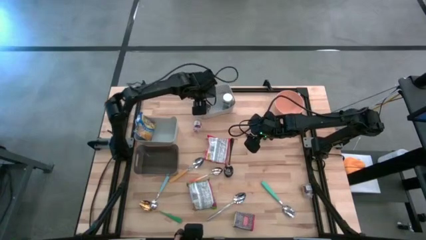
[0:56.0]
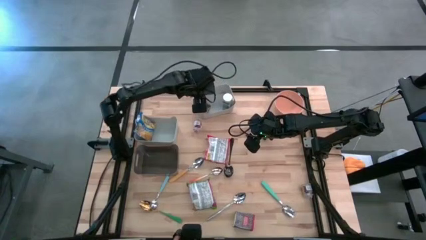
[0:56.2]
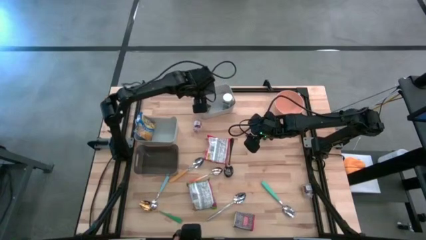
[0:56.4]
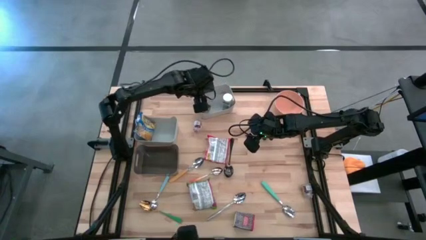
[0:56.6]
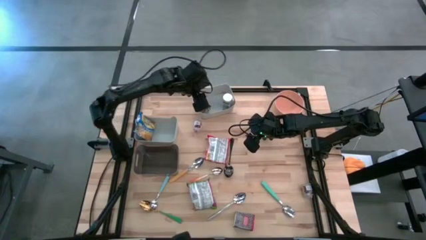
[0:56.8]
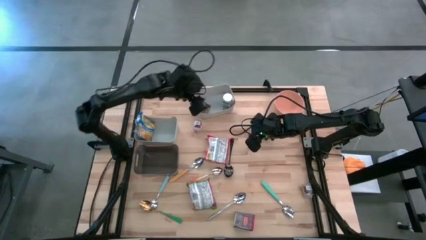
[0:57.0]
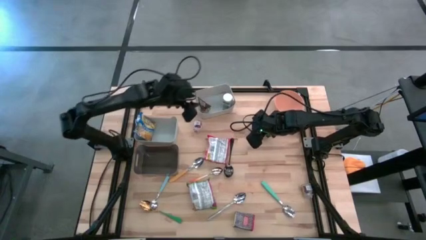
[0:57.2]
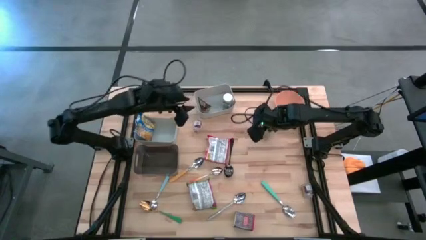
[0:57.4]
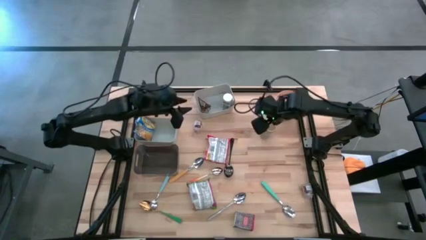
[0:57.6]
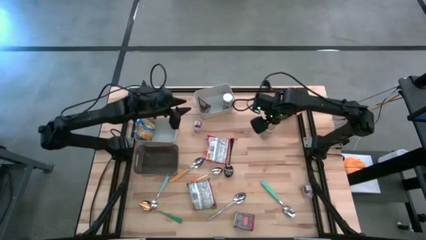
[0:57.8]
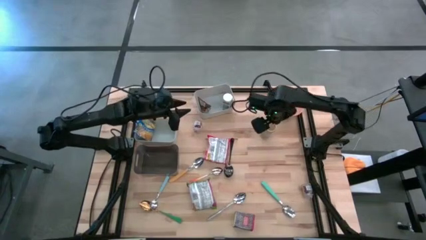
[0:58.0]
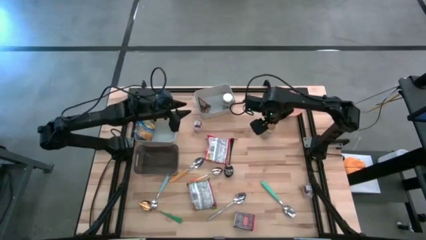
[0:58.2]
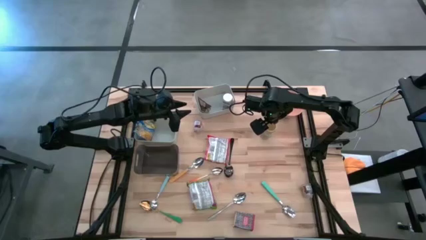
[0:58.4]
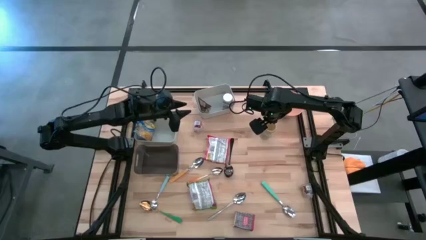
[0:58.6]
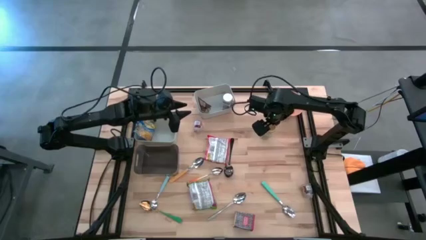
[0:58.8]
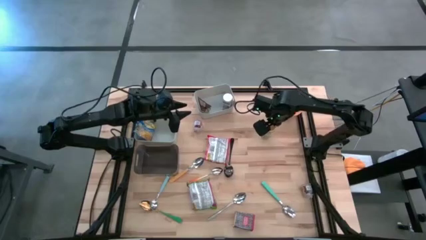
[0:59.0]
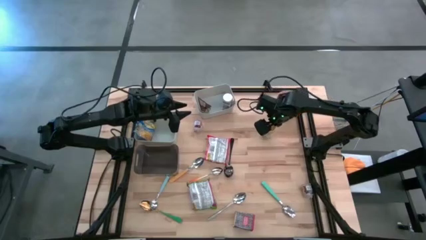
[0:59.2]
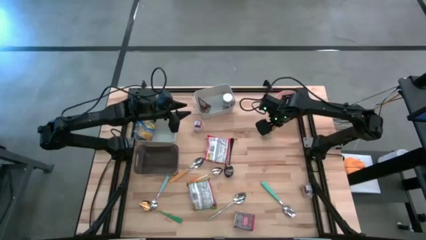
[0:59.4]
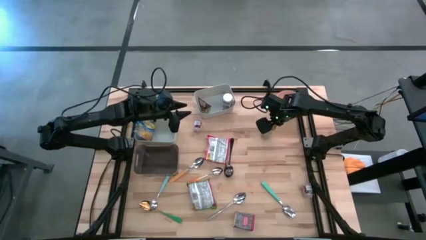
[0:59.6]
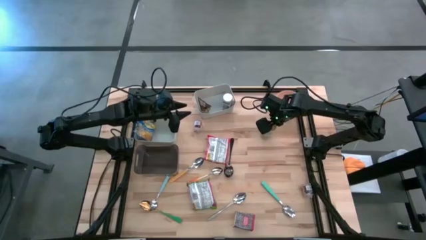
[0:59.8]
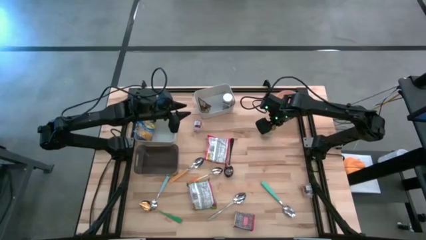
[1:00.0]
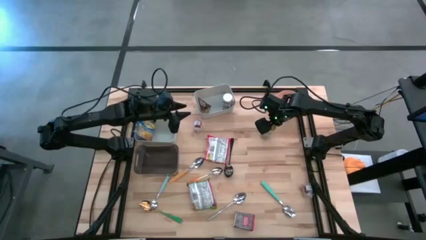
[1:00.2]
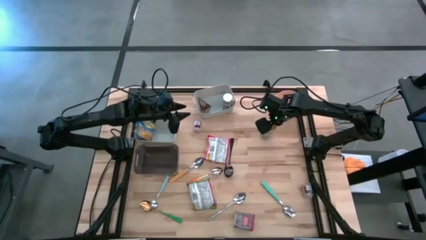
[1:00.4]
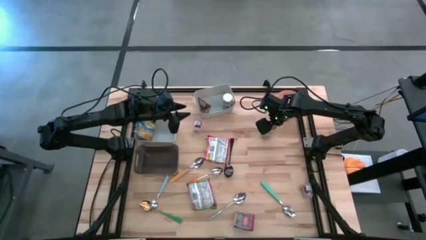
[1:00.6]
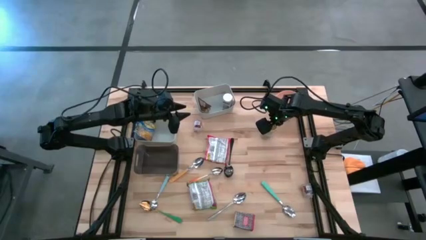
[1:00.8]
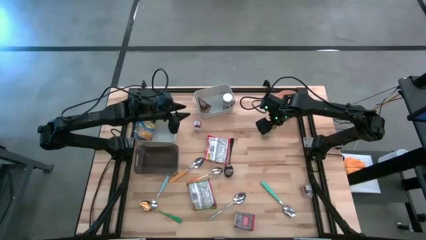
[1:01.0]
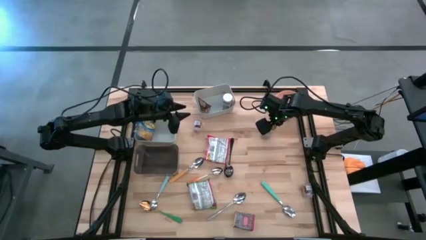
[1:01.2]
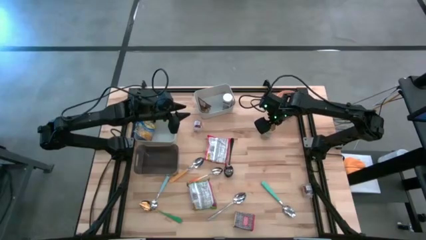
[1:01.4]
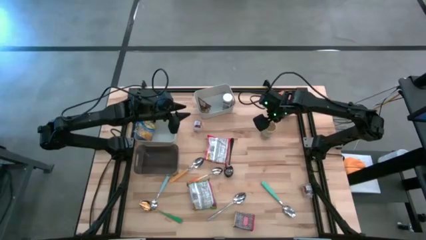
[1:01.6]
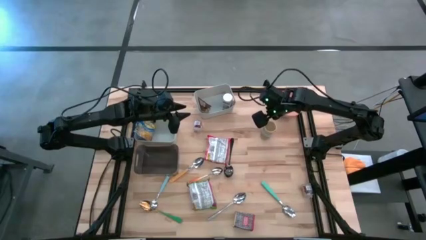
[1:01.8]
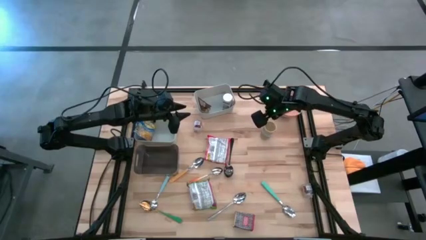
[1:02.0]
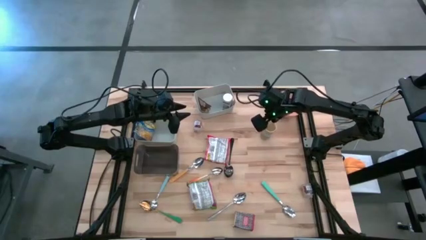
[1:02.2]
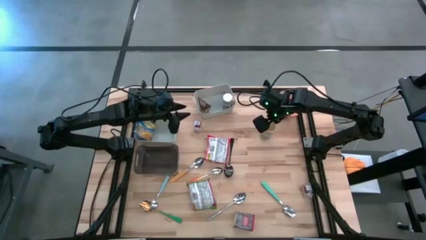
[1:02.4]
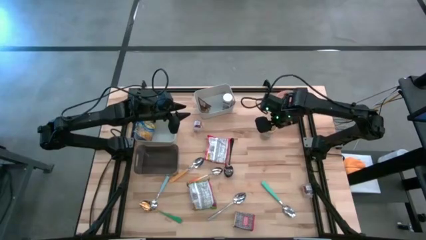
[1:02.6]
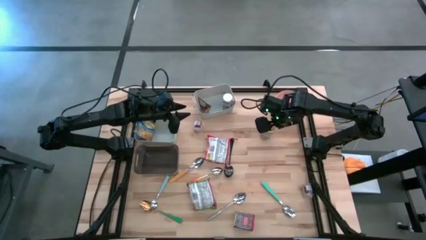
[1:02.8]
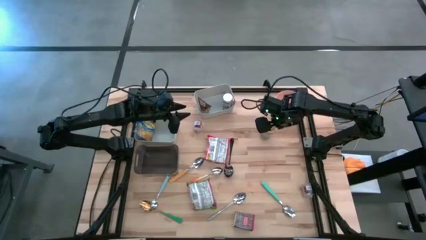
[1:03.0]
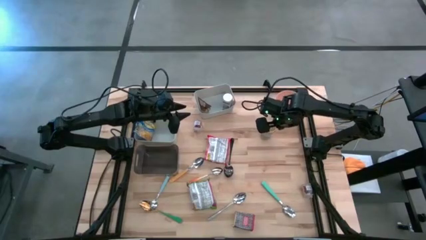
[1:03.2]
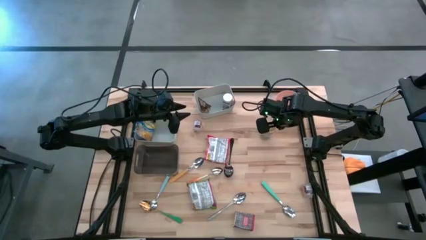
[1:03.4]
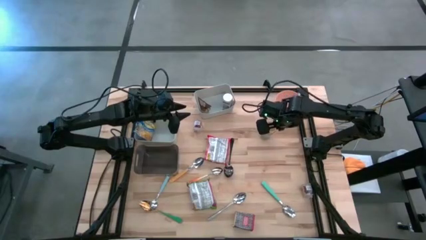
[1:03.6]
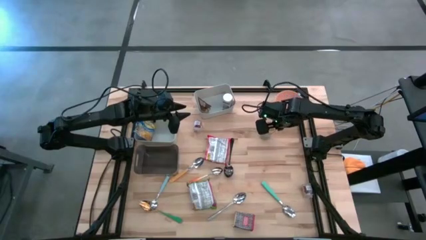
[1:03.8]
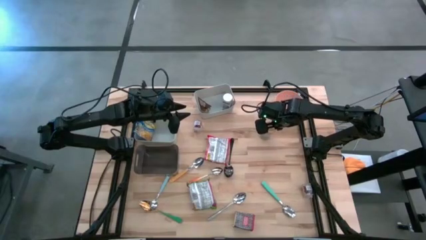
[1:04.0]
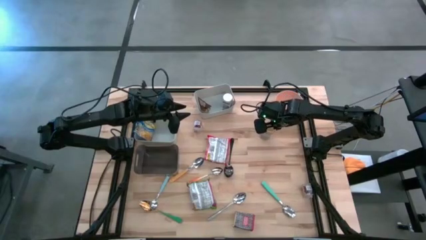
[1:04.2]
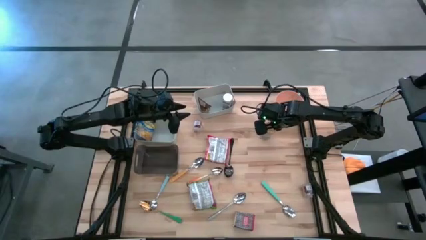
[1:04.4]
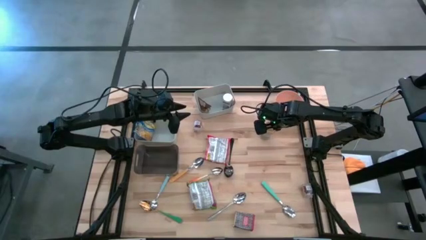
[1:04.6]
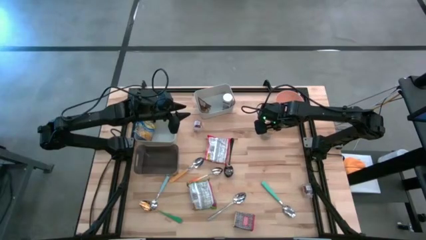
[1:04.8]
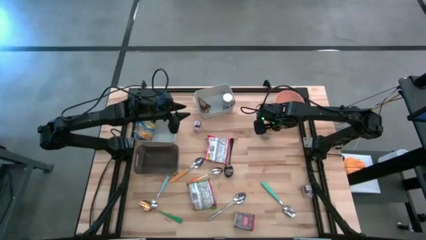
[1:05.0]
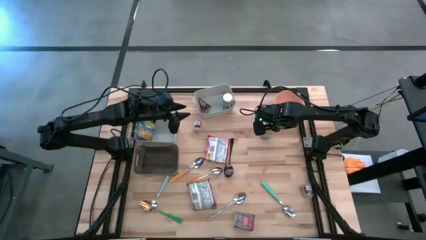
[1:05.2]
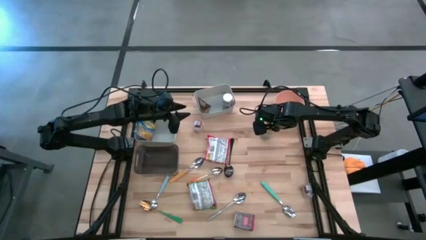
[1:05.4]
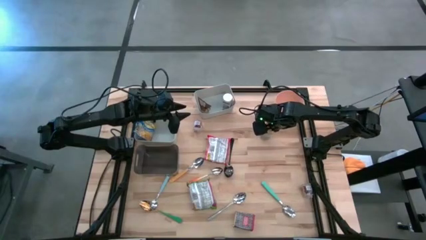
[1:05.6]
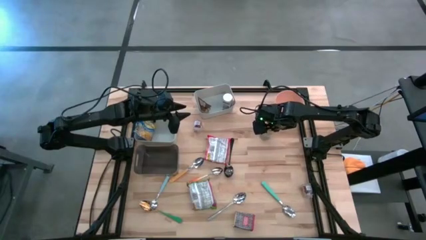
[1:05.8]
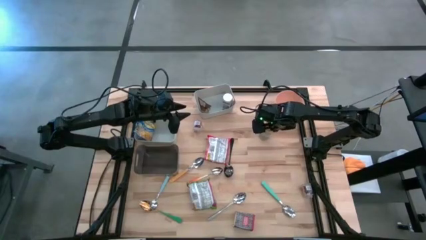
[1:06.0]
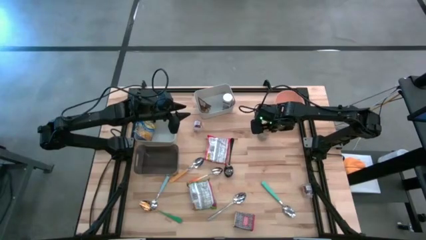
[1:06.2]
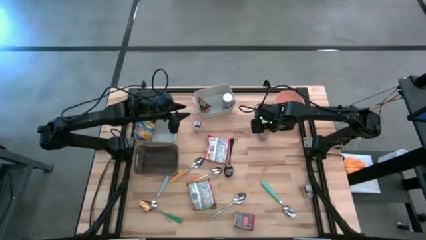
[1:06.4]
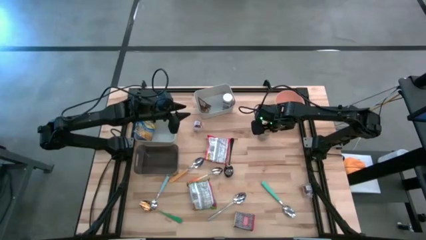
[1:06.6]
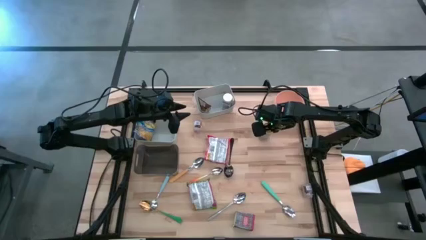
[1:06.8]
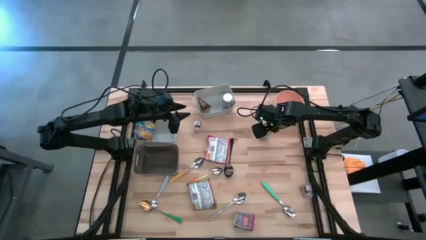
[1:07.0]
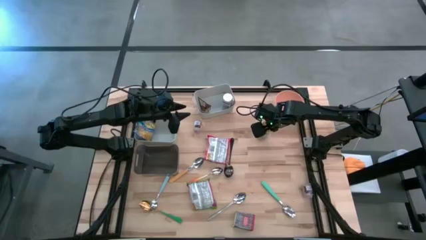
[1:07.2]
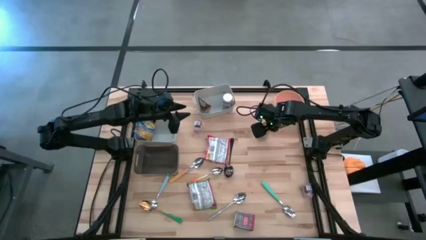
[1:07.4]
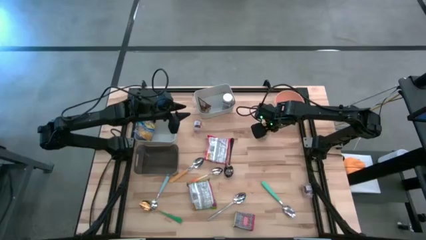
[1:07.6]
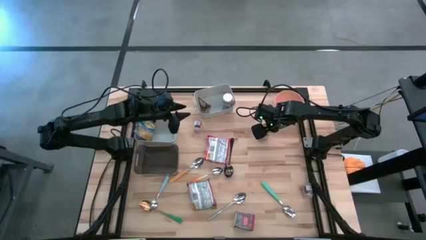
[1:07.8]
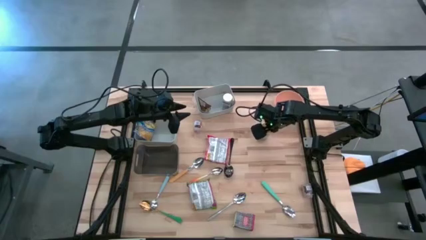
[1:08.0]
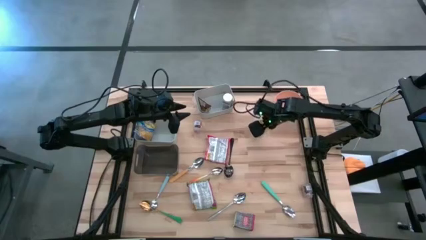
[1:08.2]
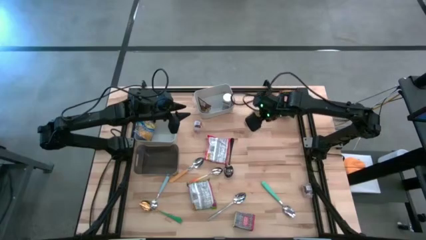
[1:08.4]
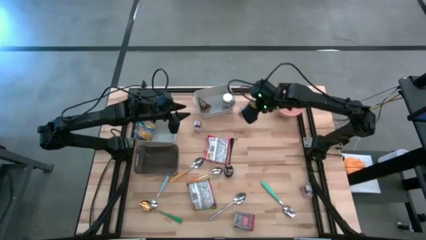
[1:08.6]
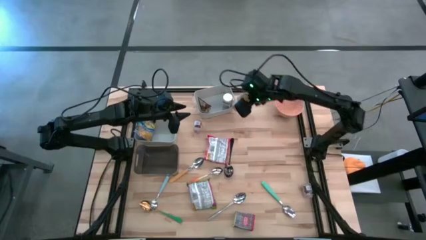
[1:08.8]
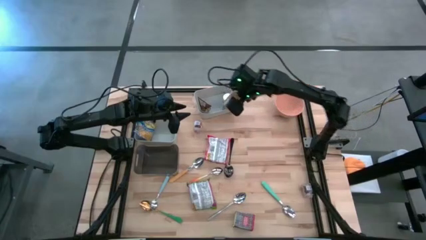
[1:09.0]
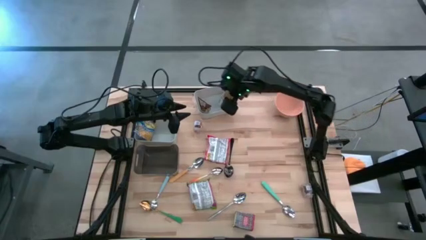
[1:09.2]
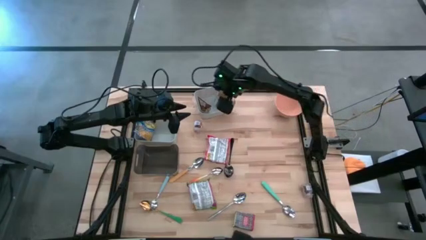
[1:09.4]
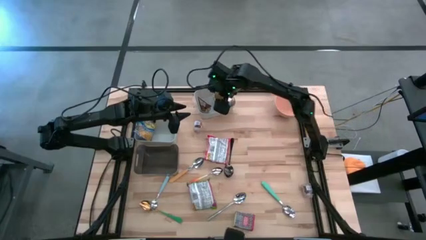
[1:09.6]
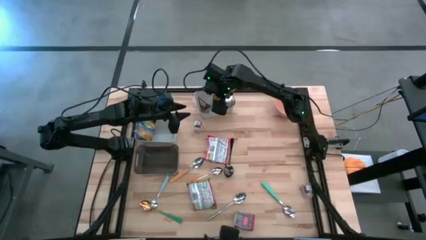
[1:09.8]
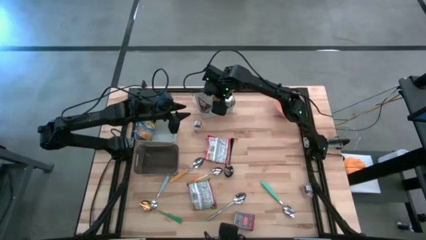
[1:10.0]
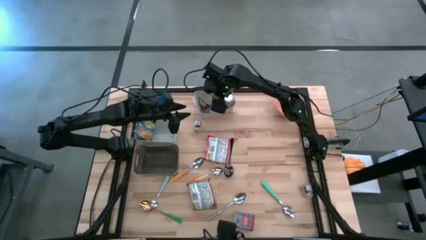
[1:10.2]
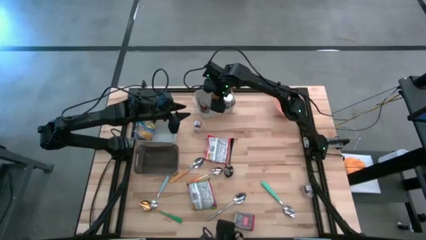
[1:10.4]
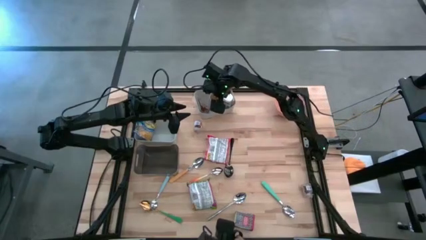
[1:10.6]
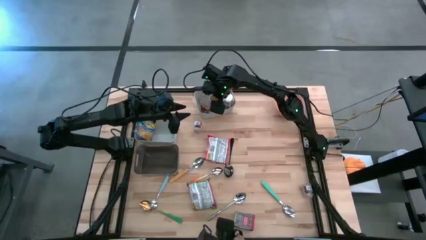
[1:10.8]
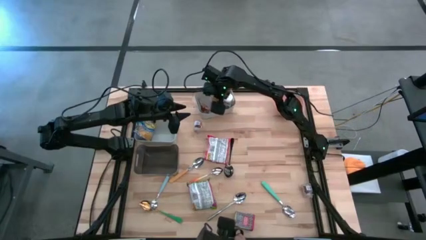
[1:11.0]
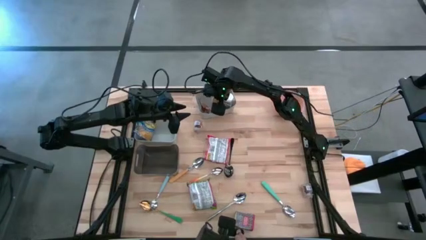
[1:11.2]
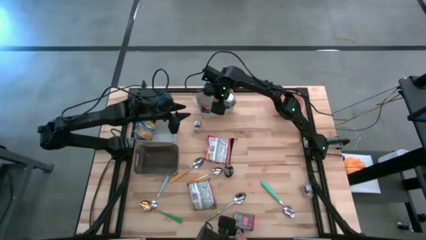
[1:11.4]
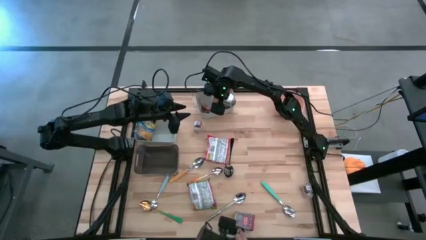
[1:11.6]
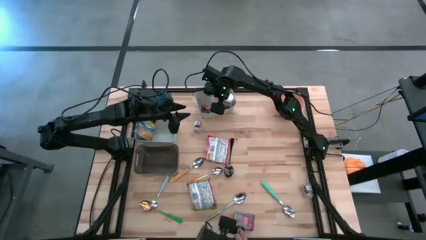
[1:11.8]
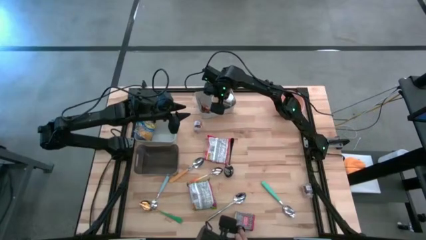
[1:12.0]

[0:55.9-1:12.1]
Put the gold spice bottle into the top gray bin
